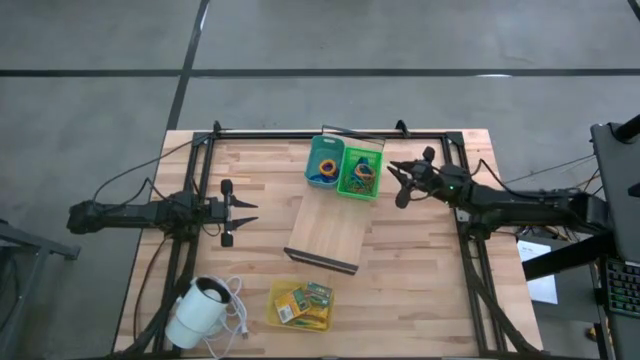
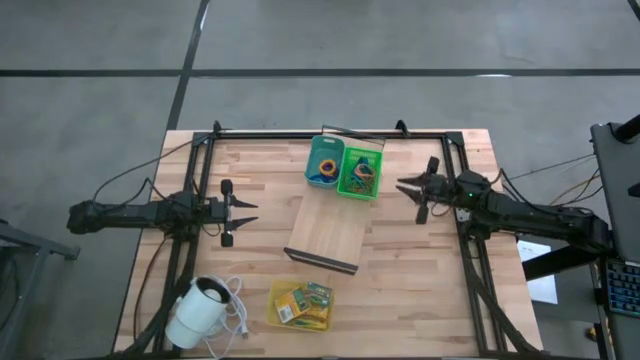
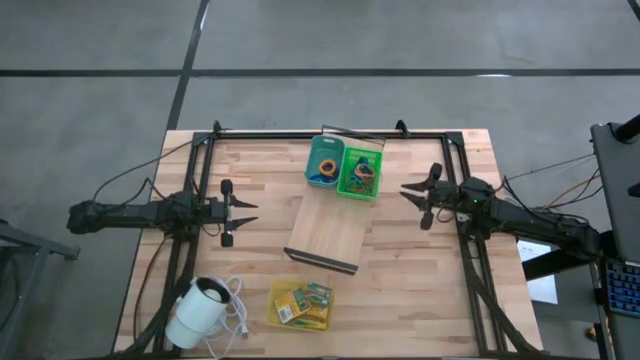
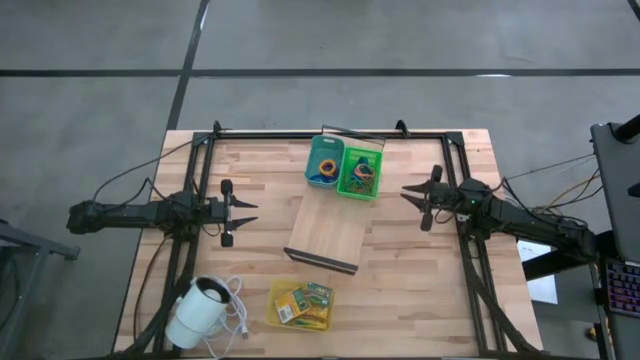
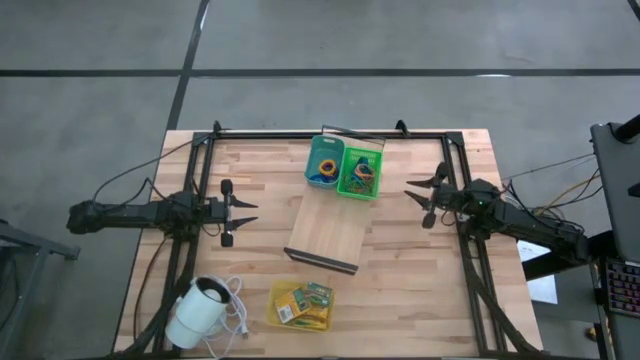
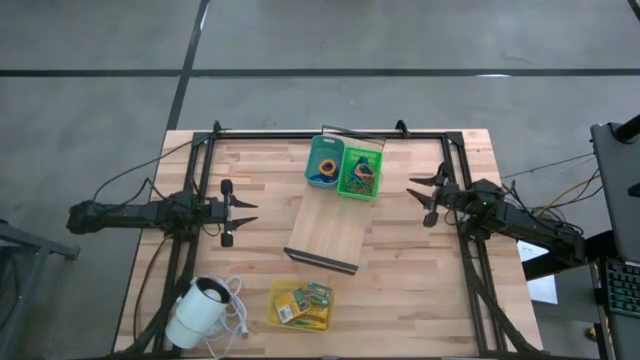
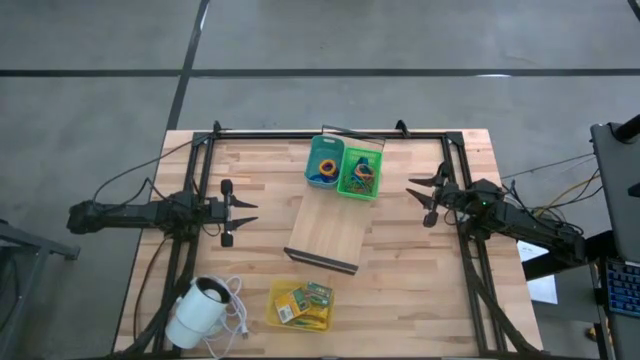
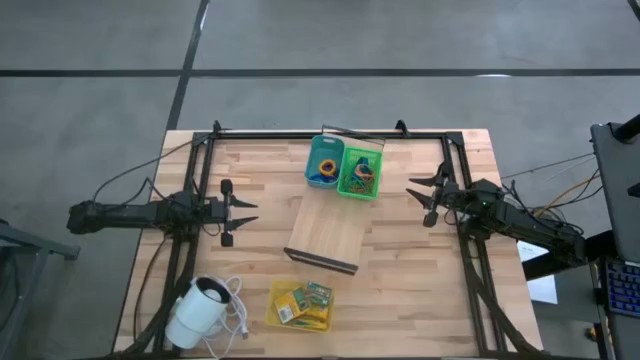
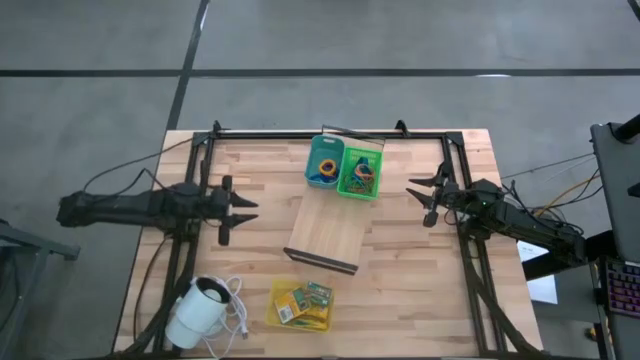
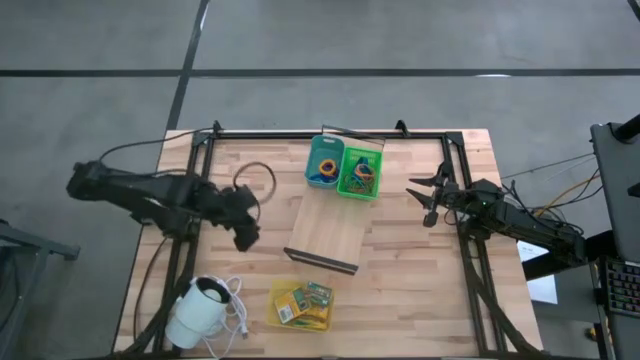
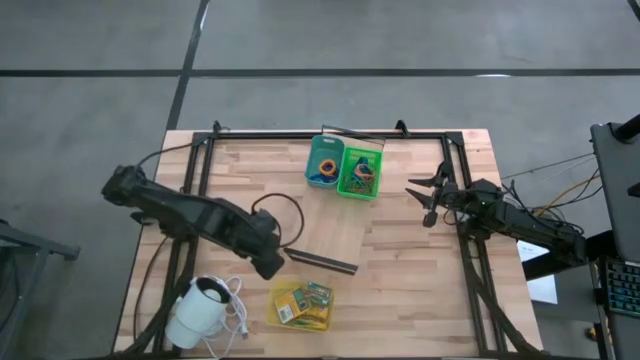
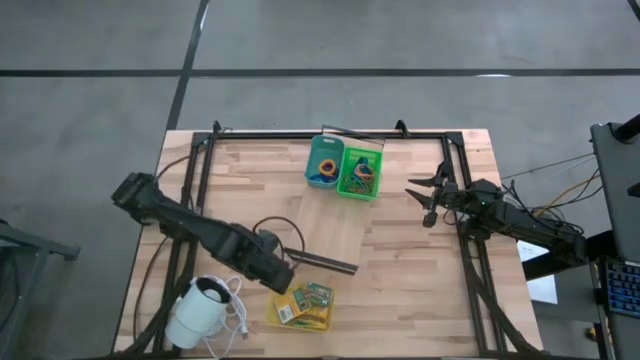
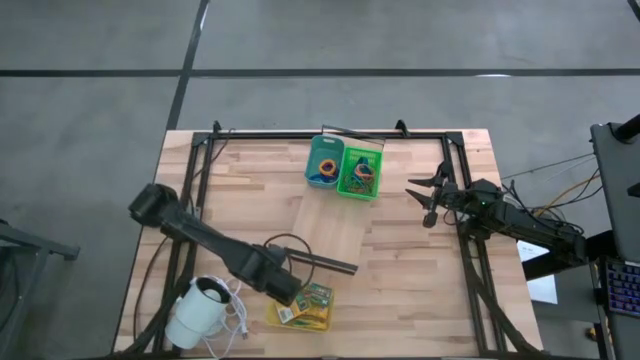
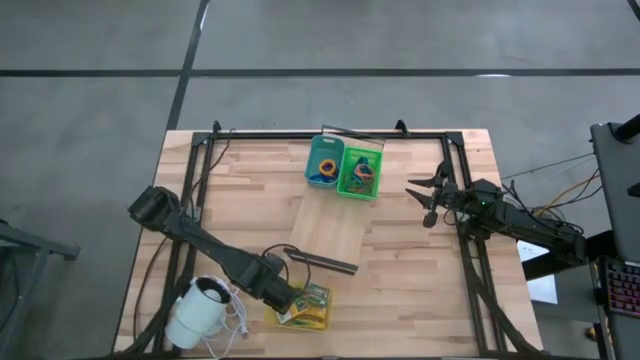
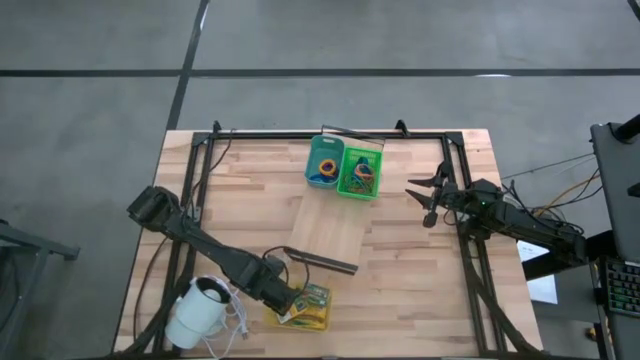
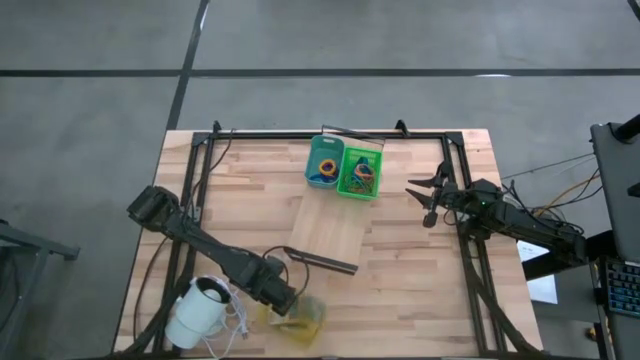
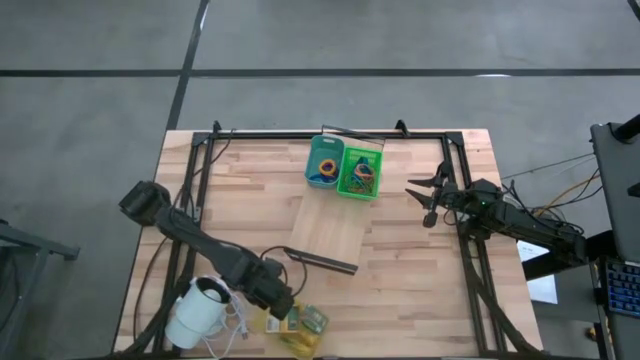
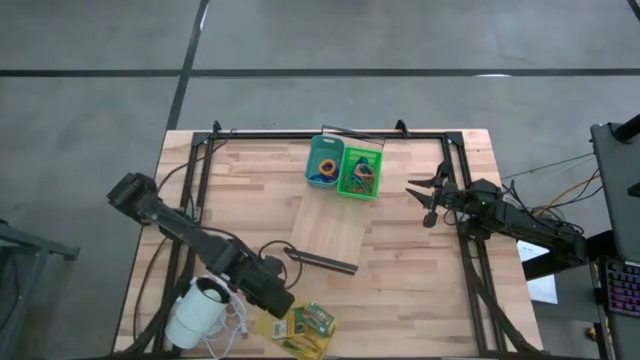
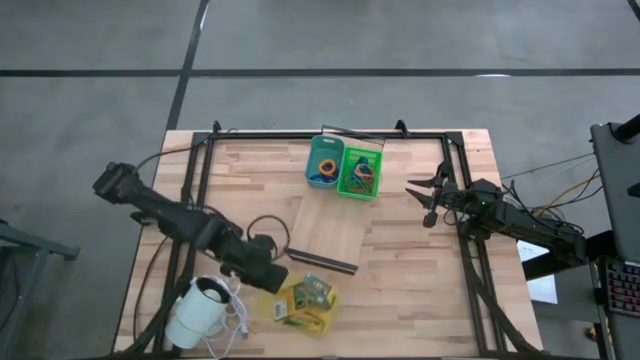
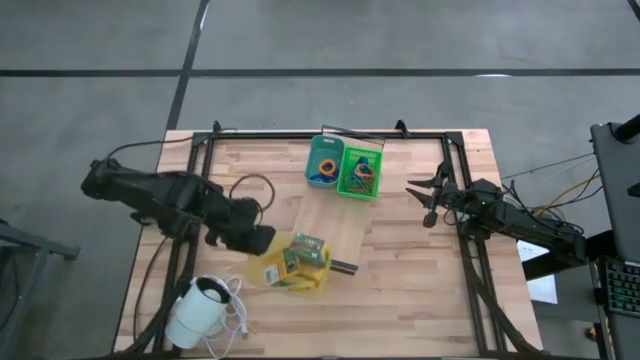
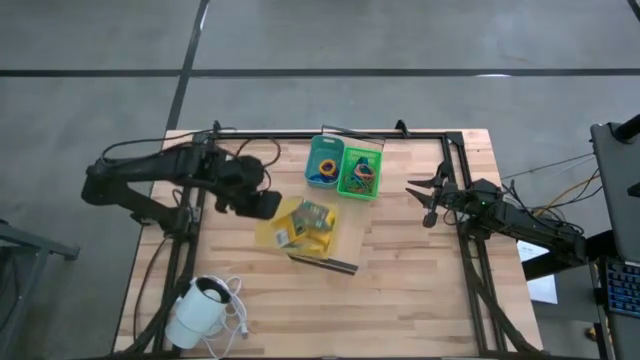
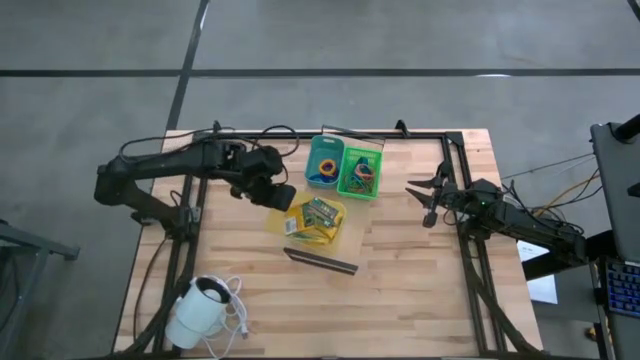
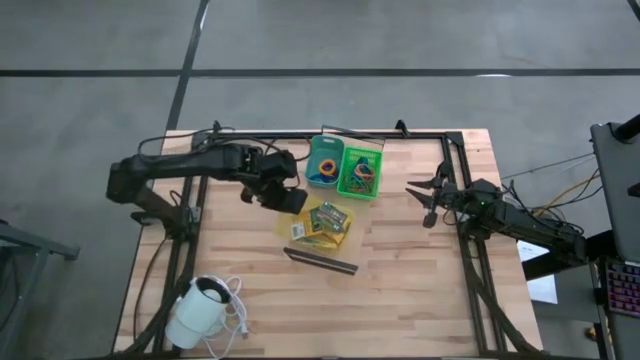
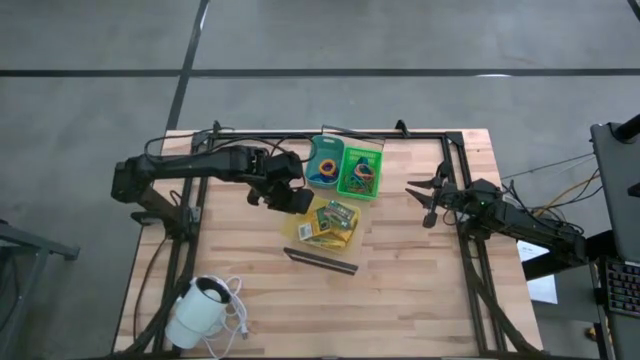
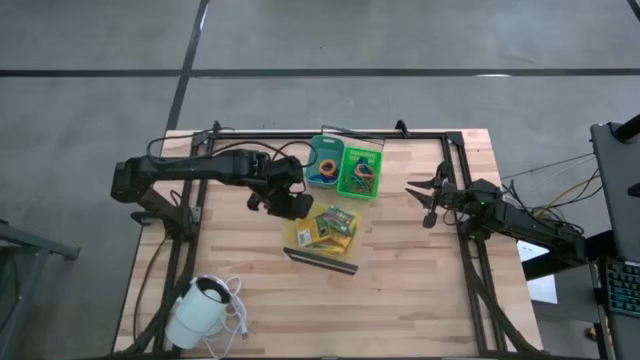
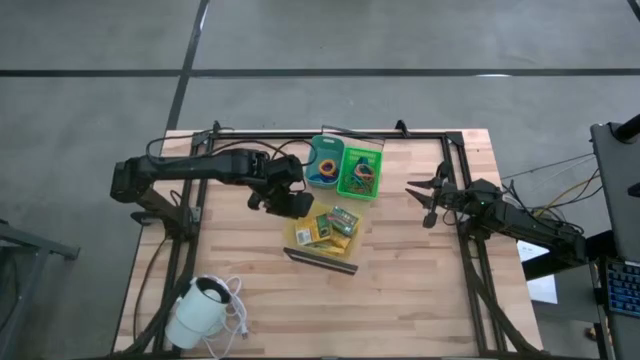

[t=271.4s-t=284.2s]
Task: Pick & Place Office Desk Supplies
Put the yellow bin on the shelf

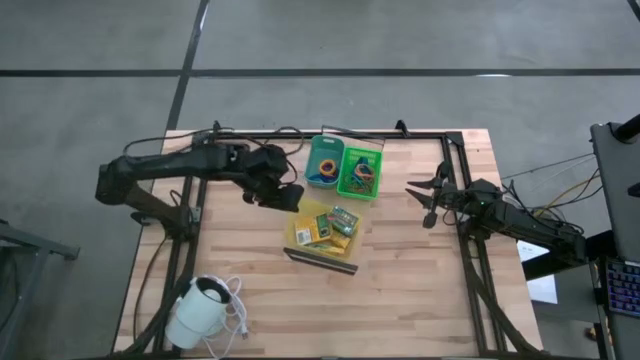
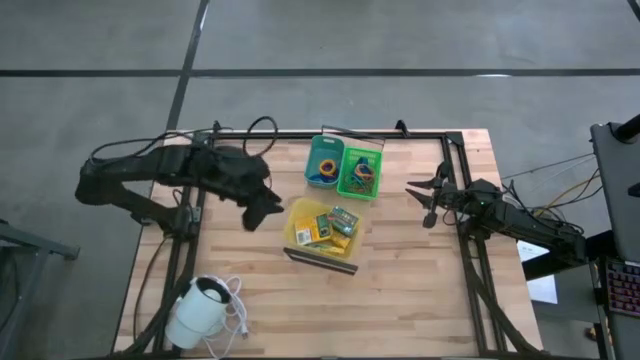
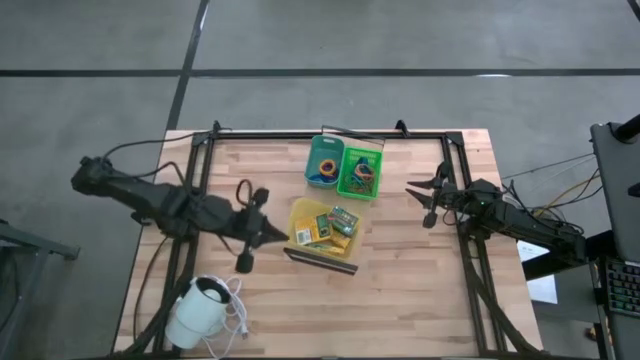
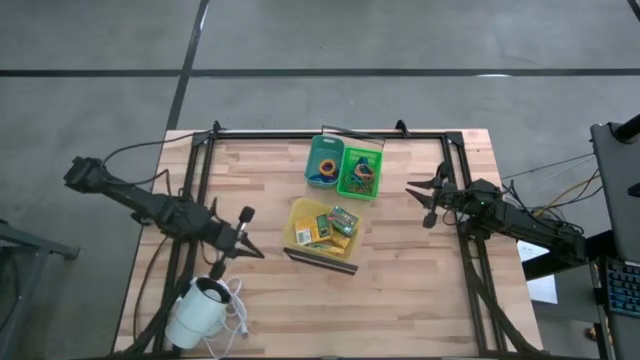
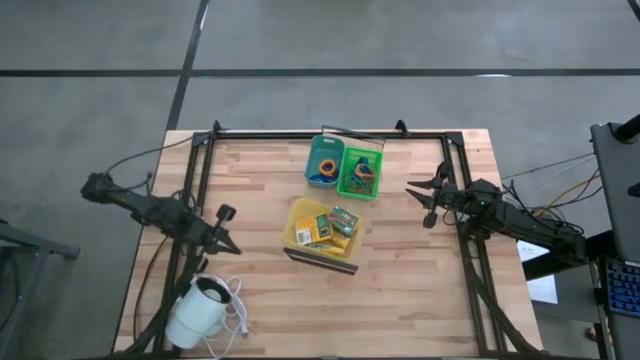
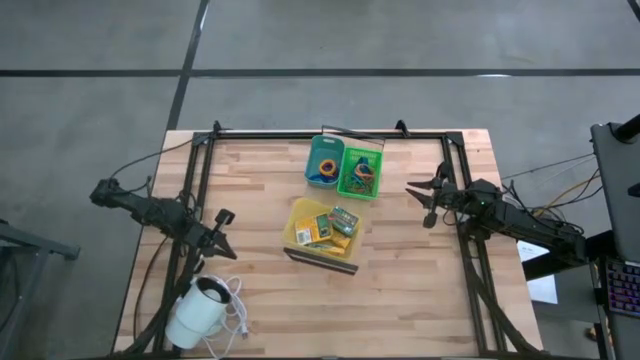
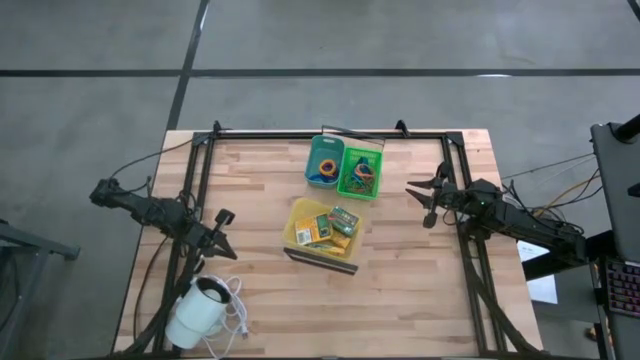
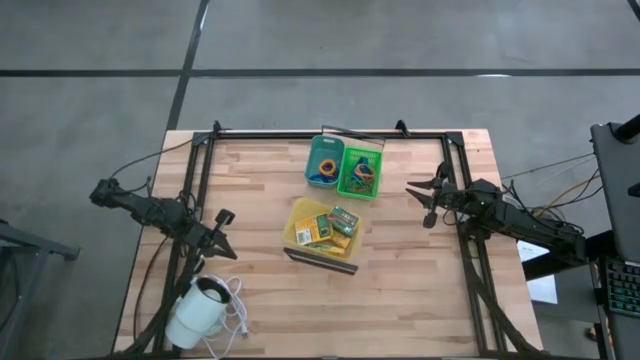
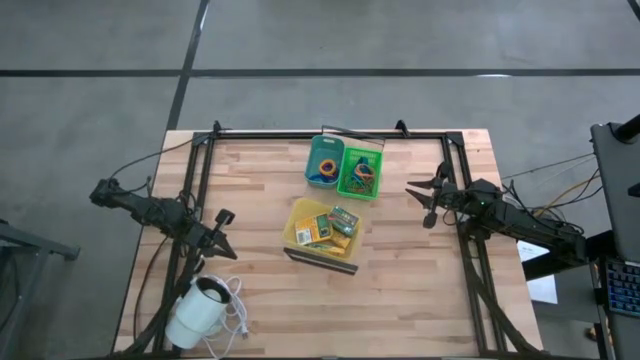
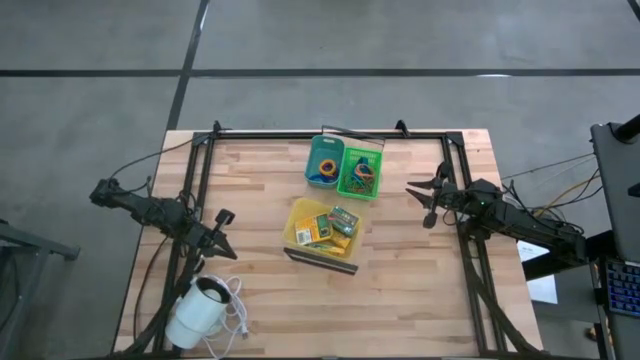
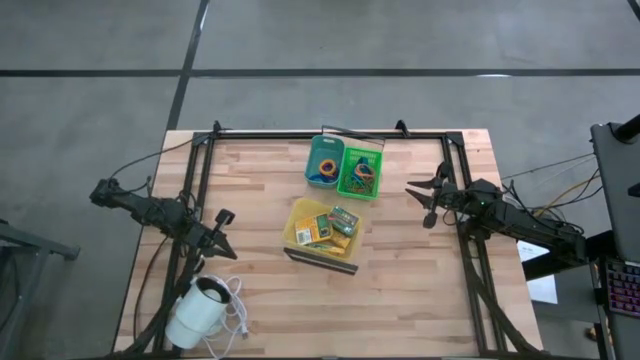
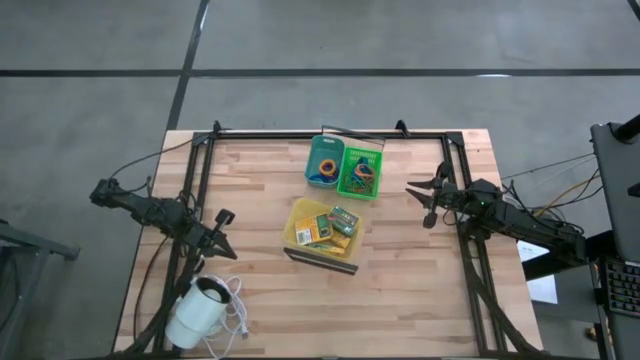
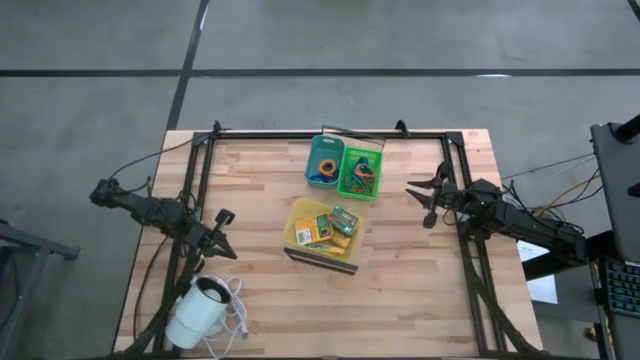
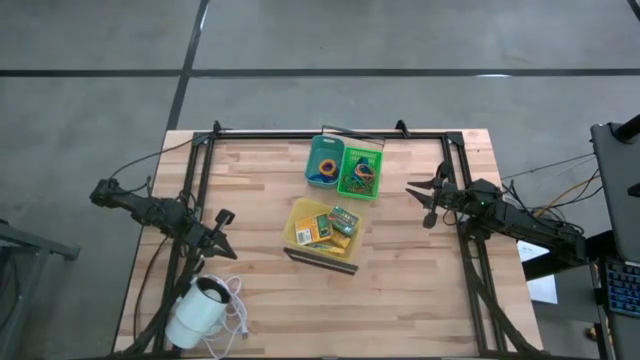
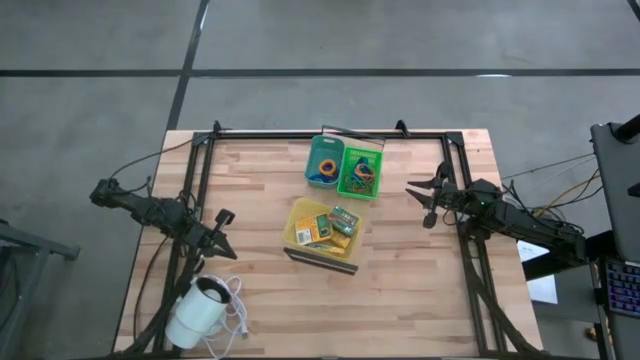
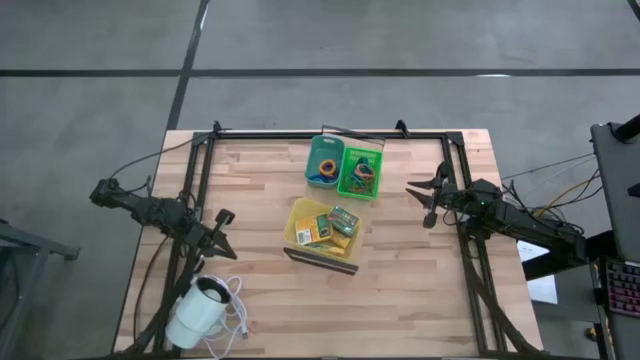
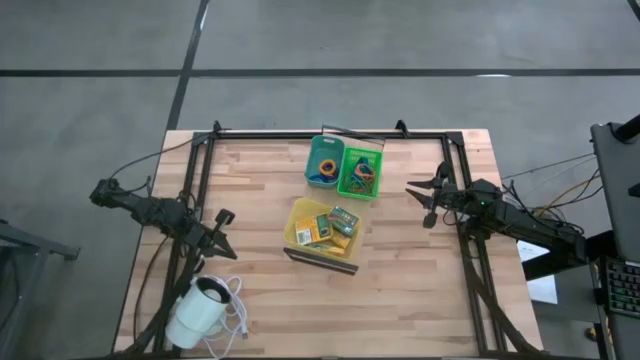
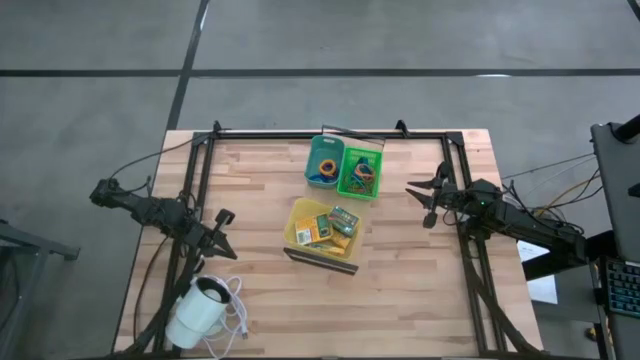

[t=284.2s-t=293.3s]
Return to Home Position
